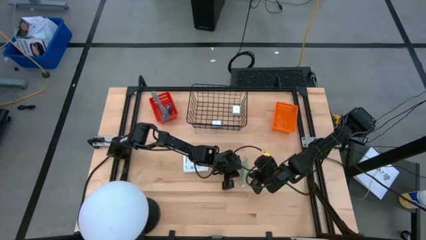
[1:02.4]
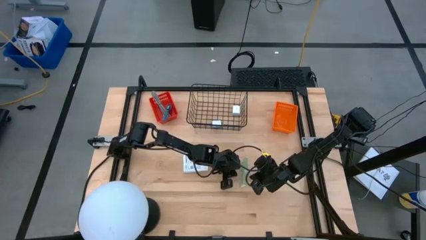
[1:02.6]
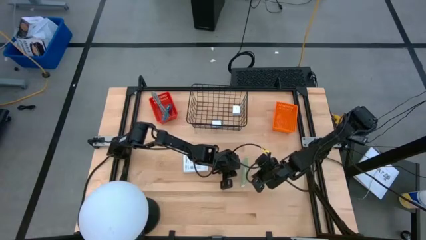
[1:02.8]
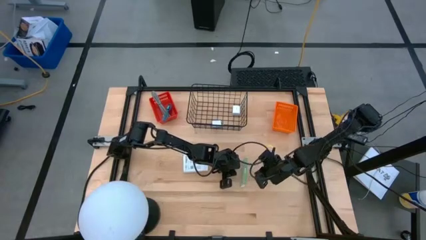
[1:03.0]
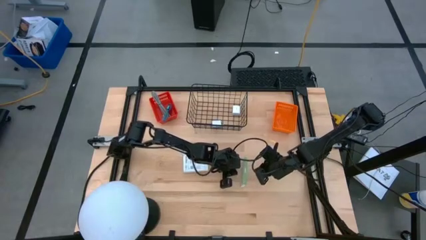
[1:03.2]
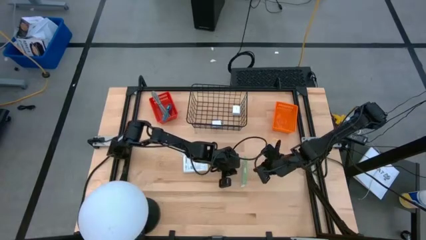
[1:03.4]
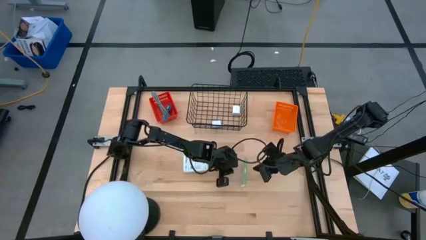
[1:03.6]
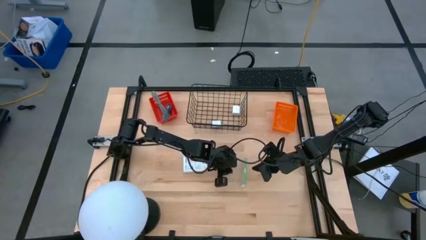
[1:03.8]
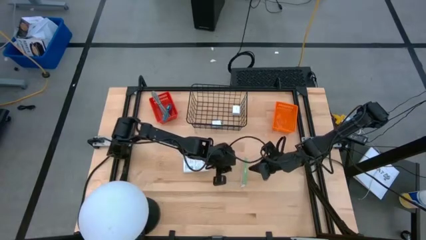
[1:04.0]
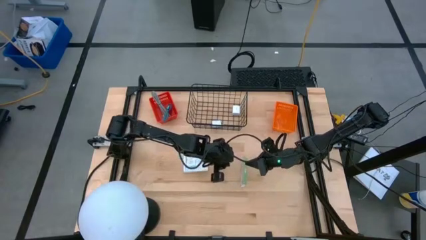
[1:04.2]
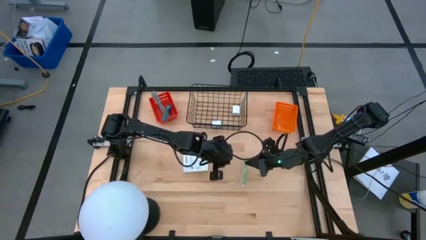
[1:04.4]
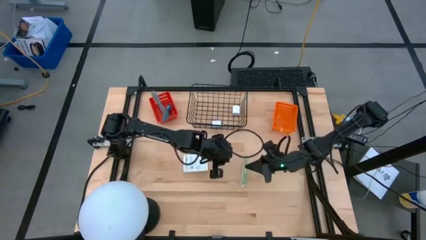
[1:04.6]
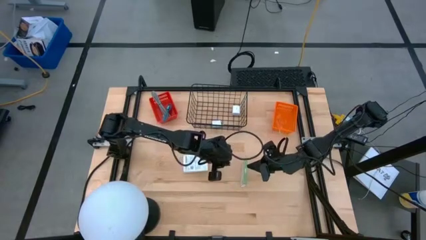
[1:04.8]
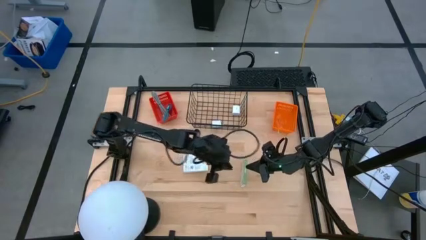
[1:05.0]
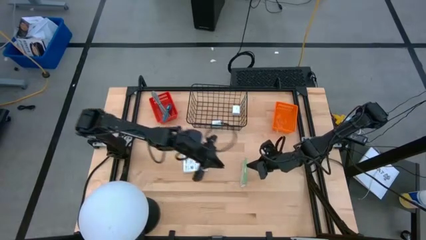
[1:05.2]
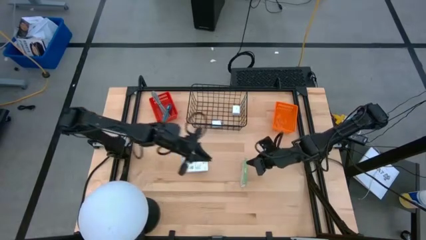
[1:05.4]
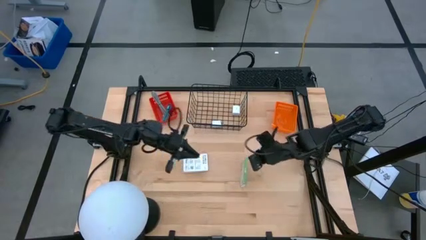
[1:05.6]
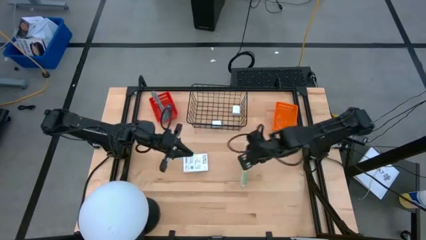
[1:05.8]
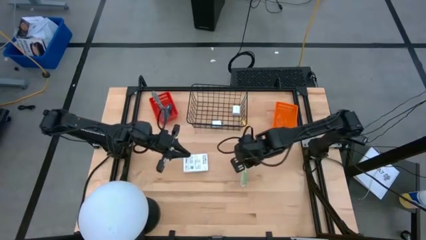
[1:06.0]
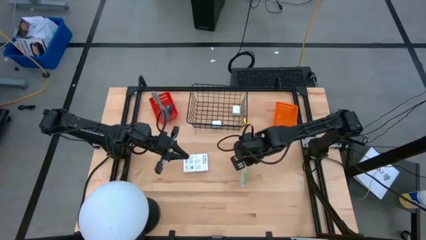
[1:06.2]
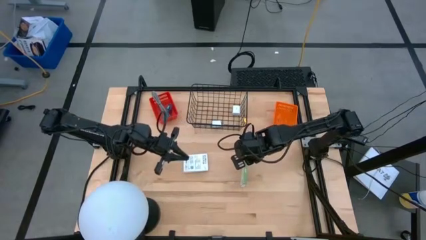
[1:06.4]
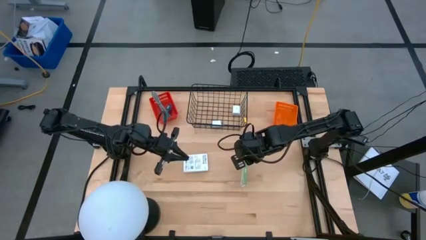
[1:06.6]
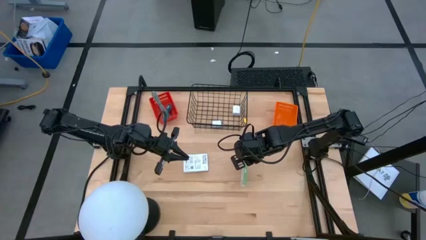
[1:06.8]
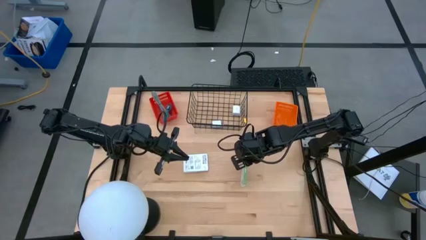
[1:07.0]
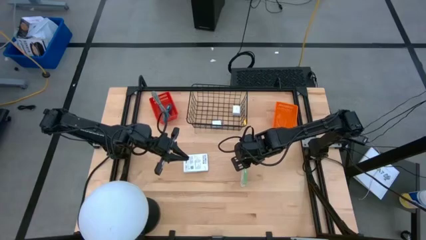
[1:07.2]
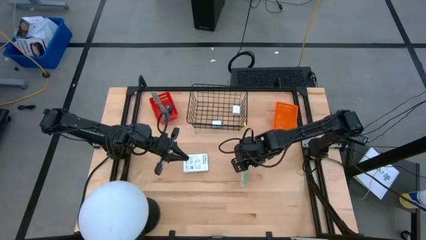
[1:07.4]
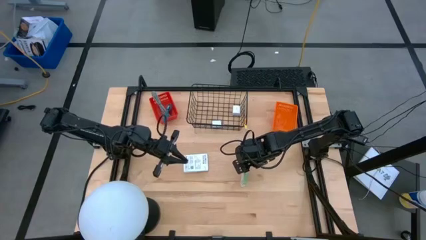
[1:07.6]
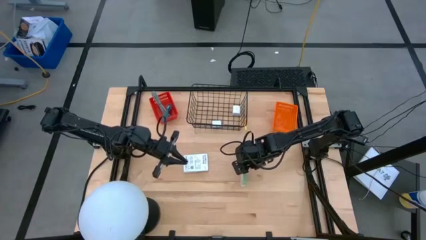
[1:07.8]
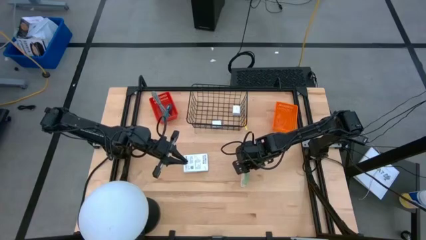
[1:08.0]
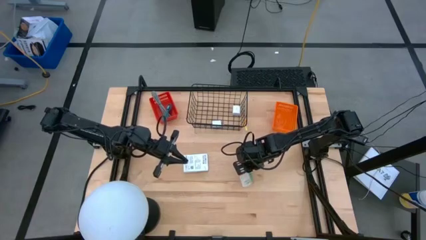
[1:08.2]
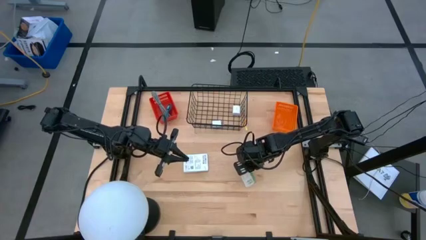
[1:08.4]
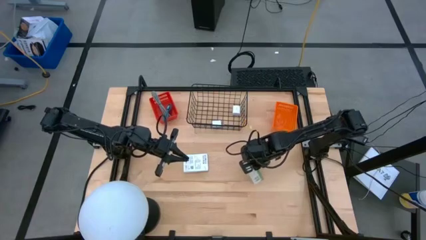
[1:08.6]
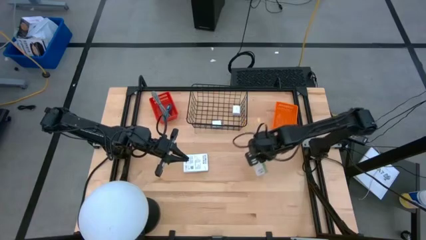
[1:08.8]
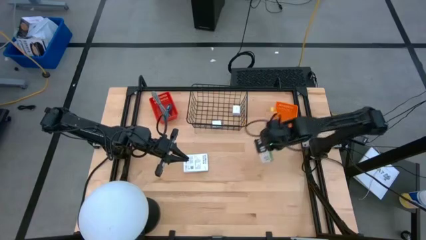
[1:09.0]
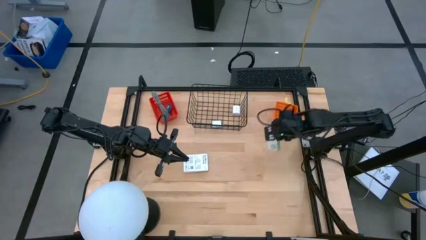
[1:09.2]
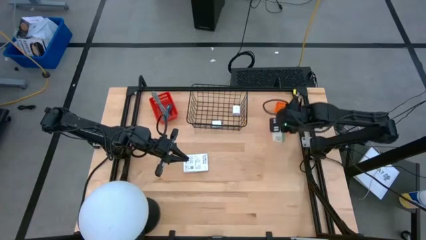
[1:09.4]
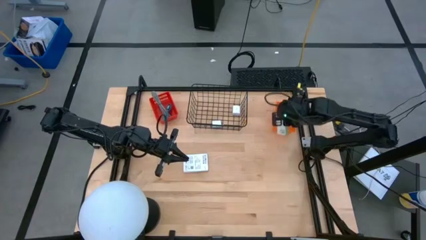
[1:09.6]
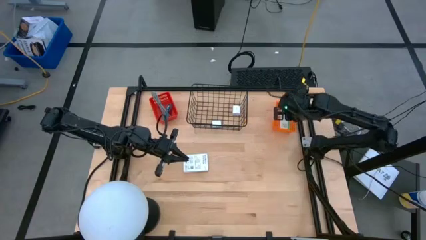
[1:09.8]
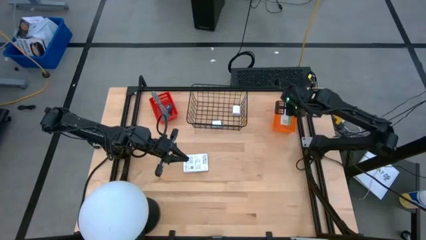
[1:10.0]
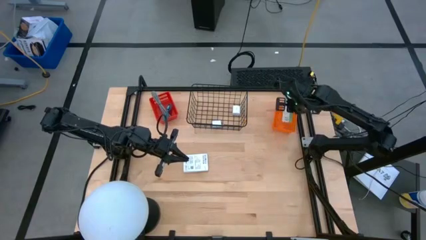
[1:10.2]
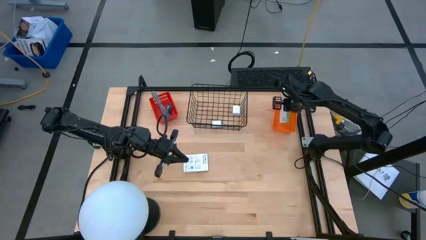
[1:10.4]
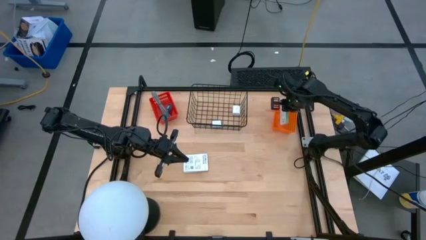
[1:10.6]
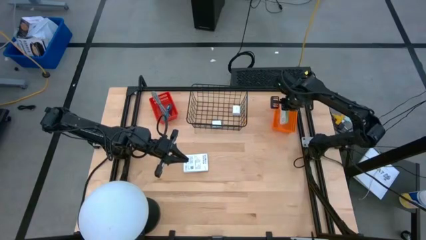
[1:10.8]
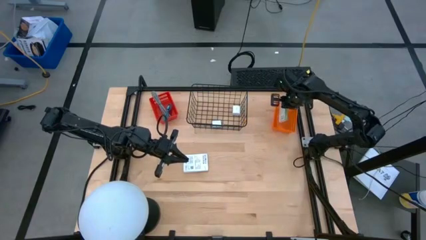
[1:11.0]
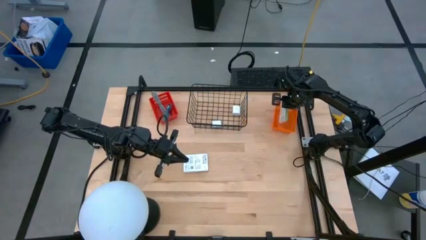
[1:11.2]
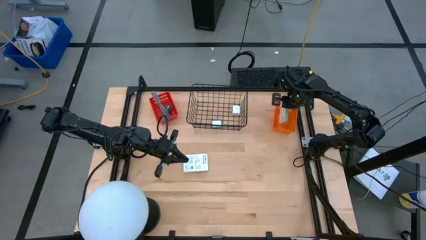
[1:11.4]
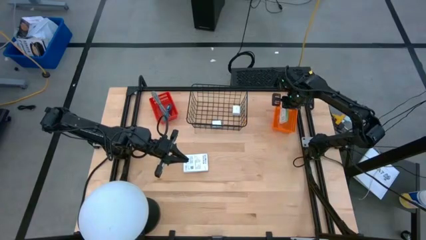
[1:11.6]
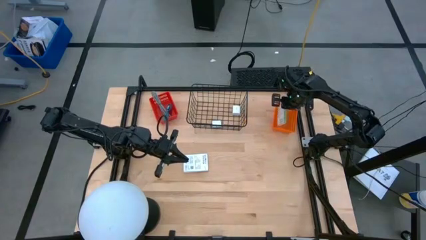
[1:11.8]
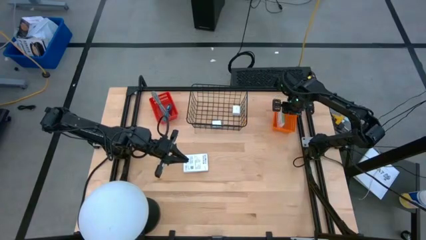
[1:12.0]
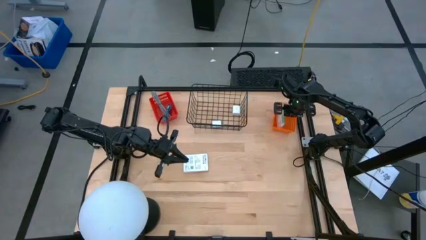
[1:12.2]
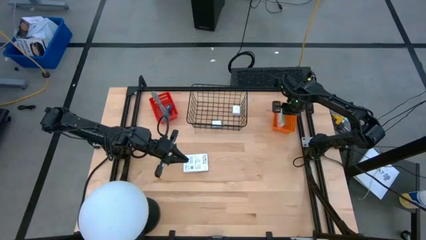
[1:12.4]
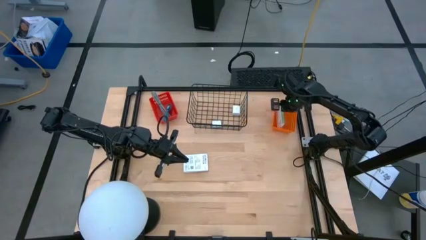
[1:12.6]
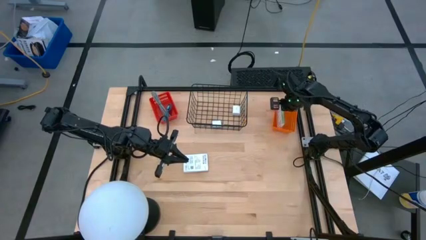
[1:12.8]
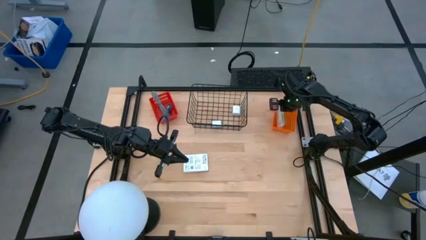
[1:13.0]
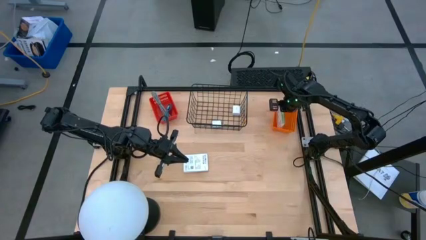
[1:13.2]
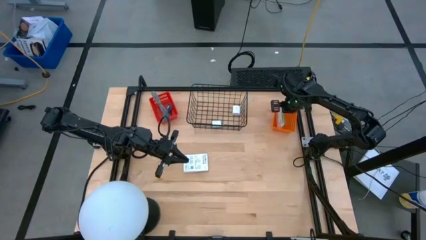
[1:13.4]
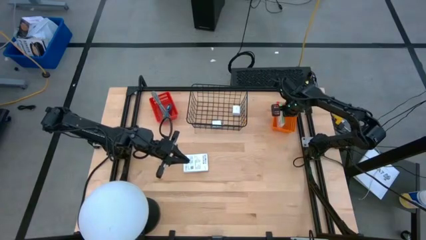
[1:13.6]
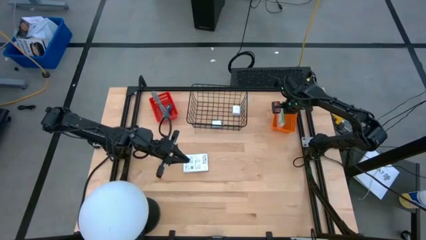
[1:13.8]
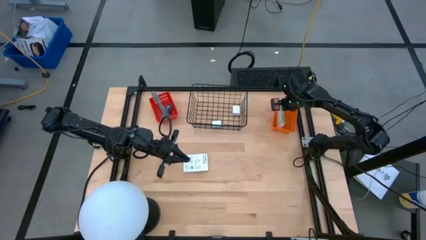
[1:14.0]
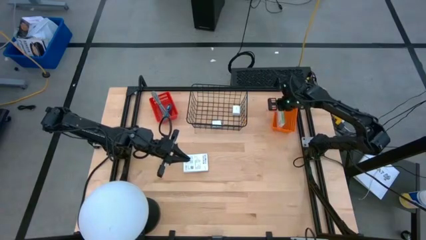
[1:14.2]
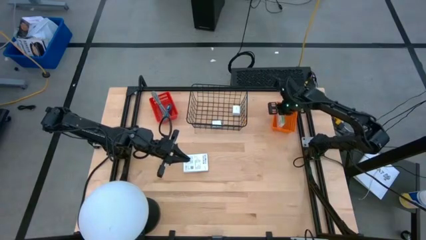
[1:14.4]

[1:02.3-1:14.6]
Task: Pick and place items into bin
Put the right card reader box into the orange bin
